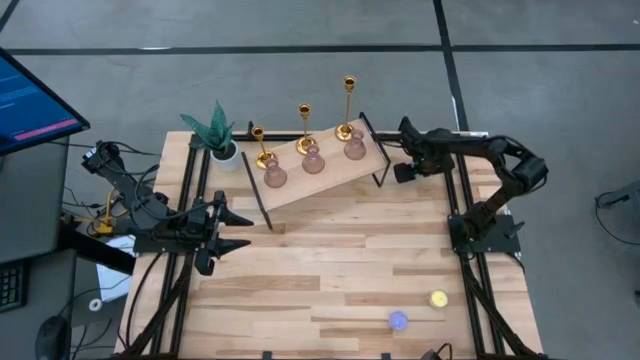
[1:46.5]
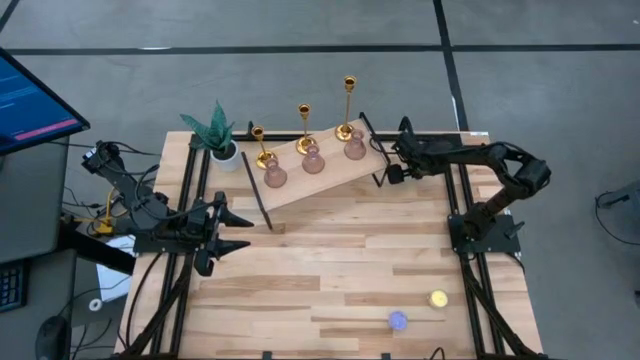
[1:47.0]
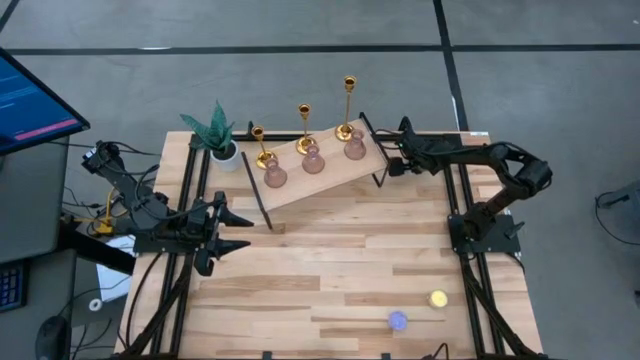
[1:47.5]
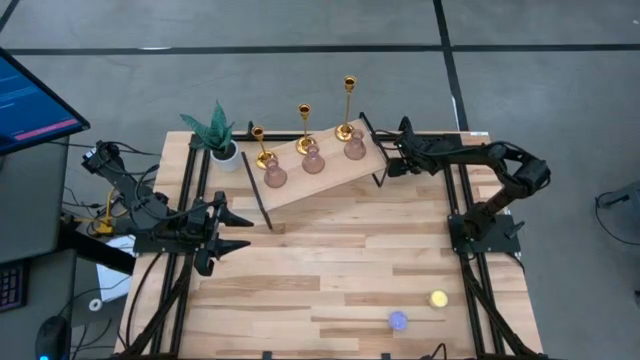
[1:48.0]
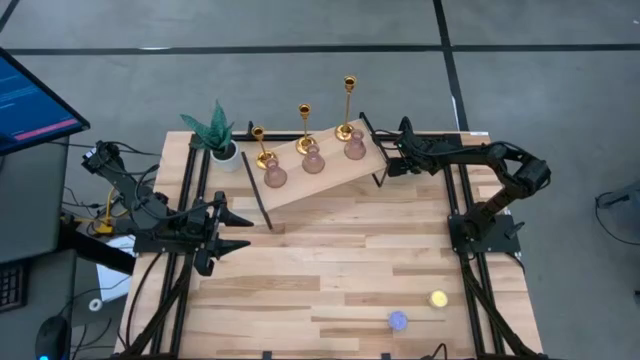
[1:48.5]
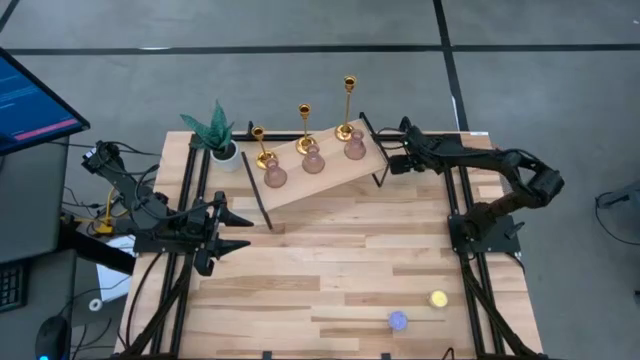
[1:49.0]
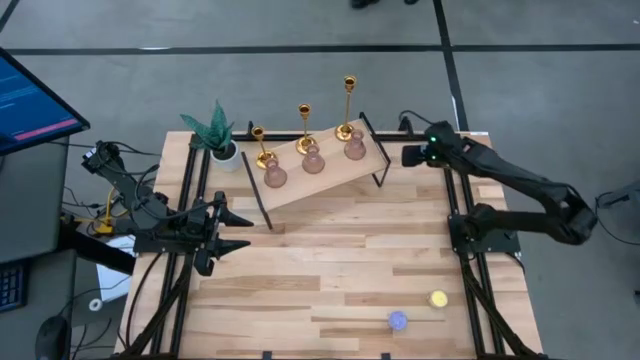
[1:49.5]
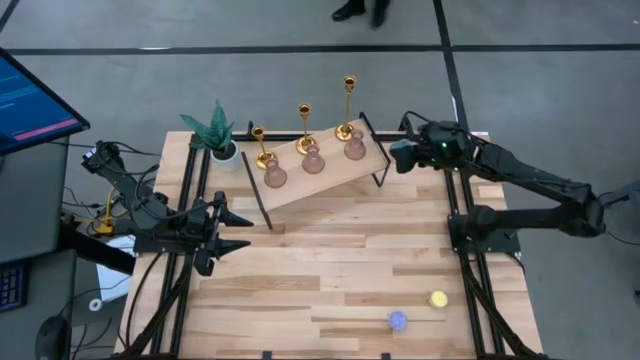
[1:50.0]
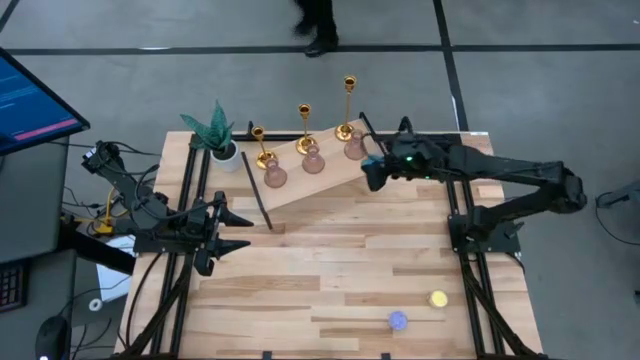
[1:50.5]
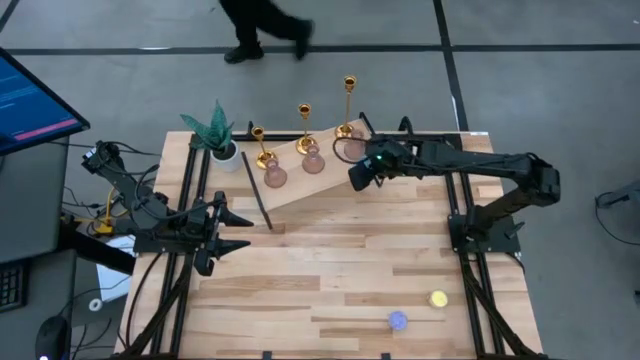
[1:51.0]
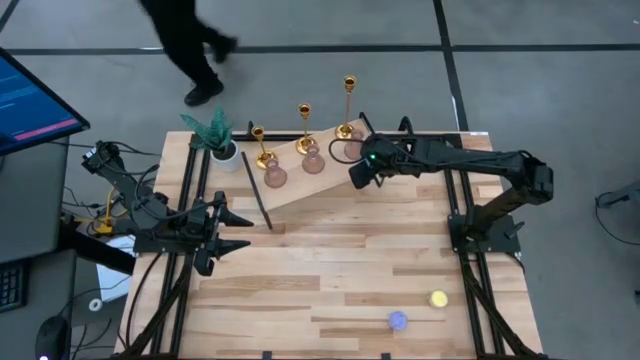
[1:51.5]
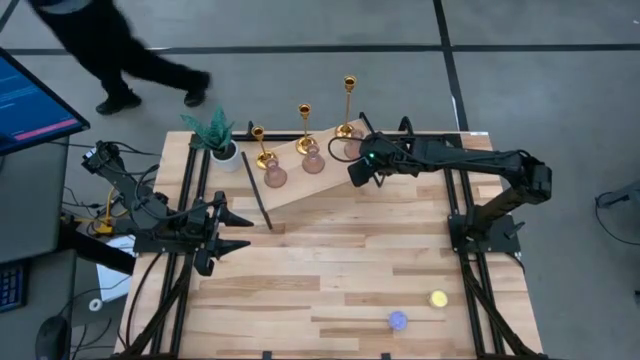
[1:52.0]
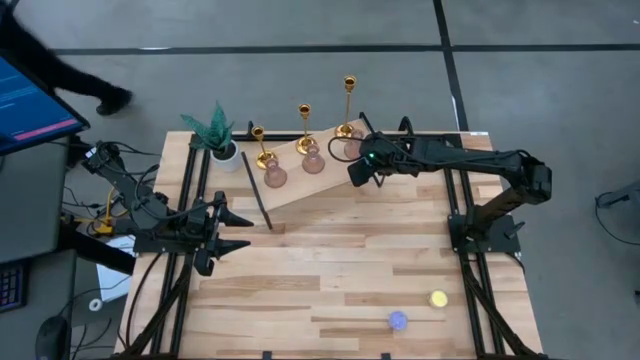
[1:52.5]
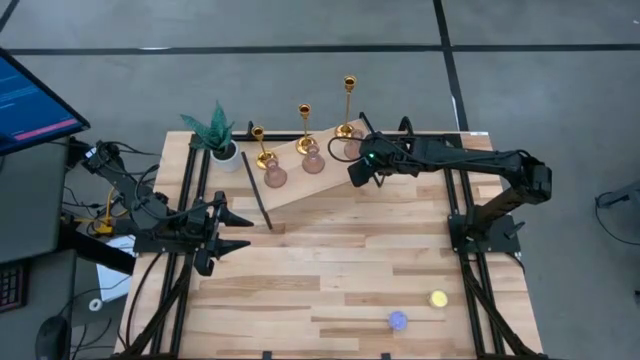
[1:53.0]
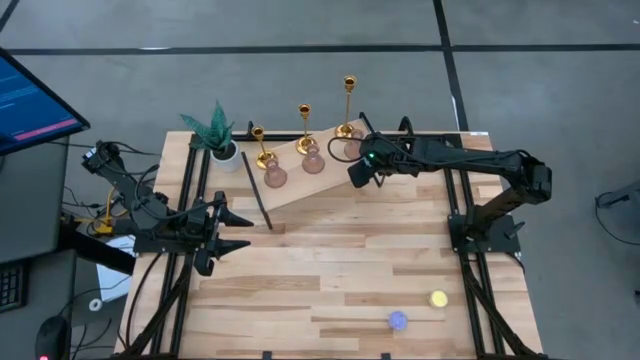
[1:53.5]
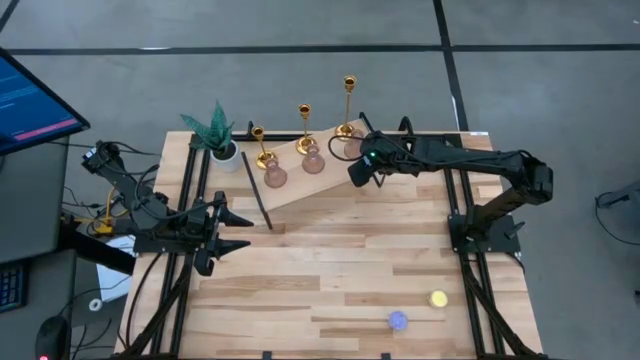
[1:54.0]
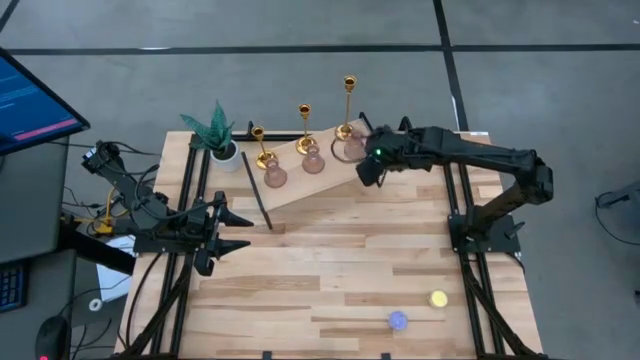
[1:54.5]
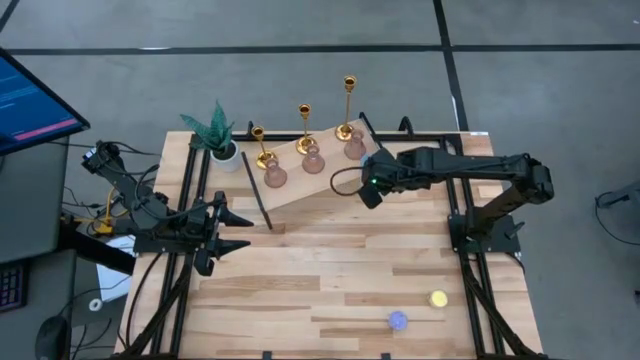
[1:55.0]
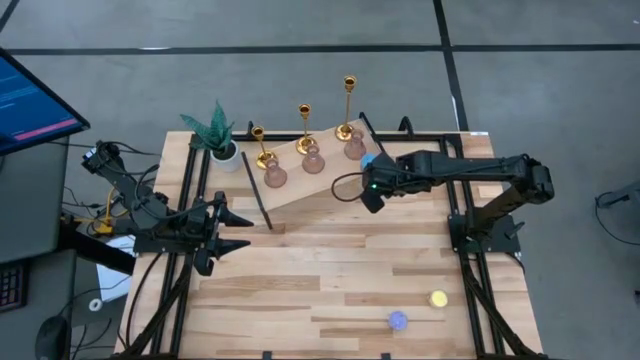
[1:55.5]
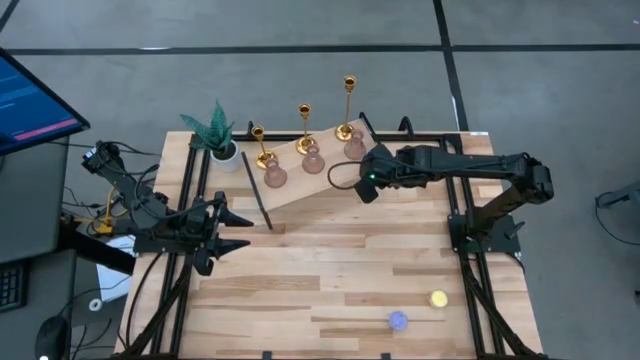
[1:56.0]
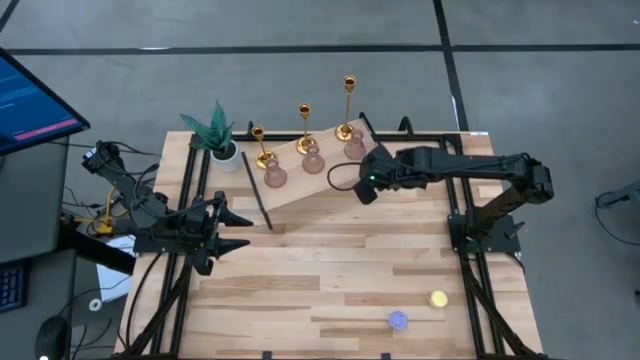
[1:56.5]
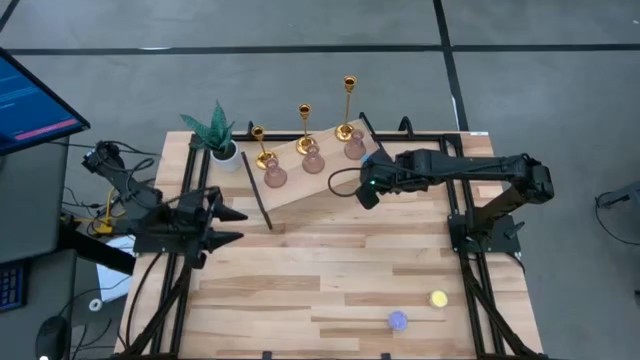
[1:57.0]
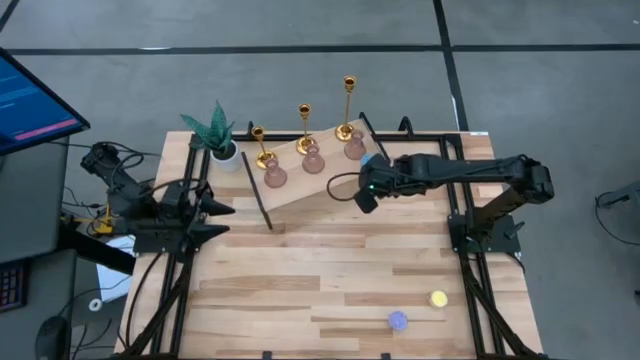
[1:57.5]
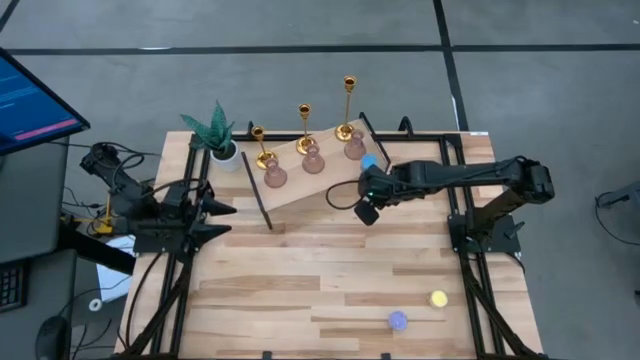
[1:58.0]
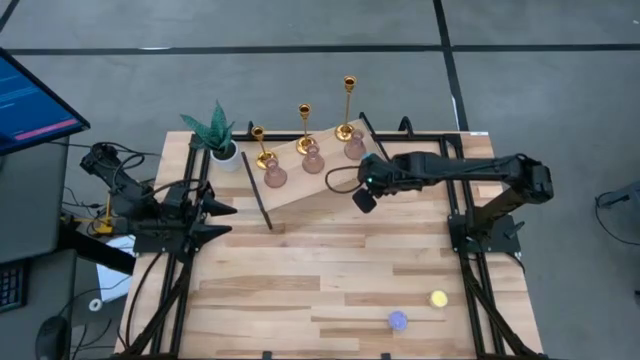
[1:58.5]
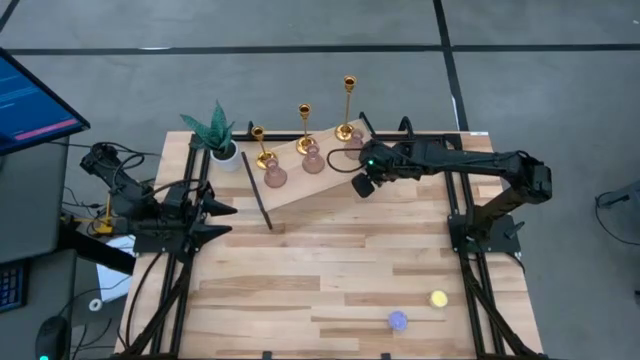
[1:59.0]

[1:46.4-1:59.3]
Task: Pick & Place candle stick holders
Put the blue scented candle on the shelf

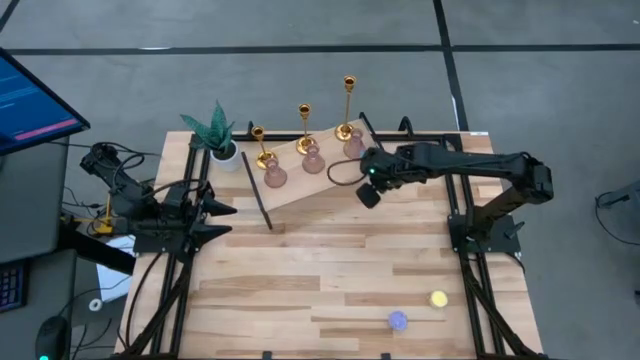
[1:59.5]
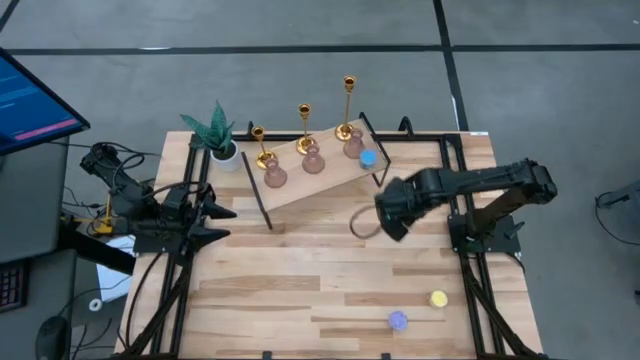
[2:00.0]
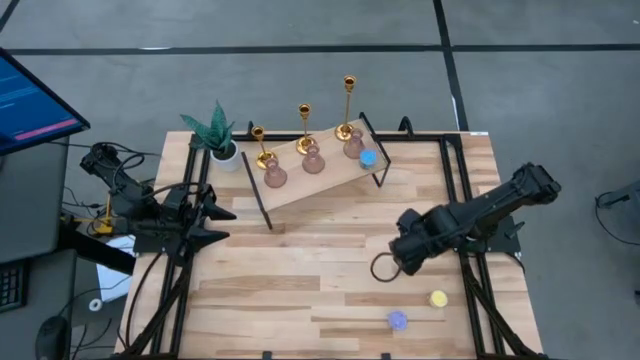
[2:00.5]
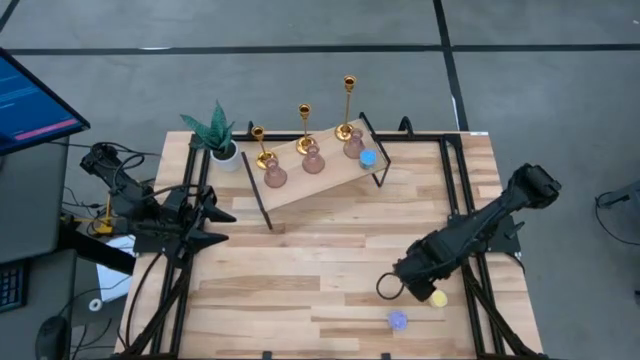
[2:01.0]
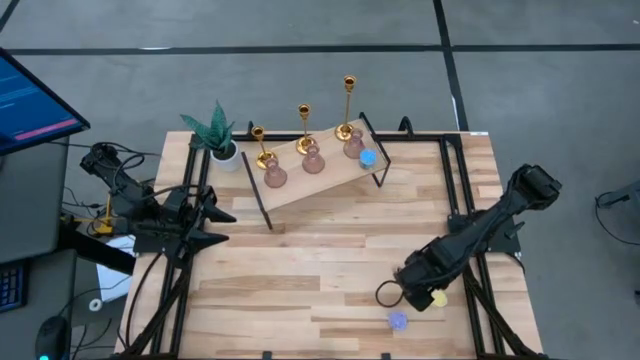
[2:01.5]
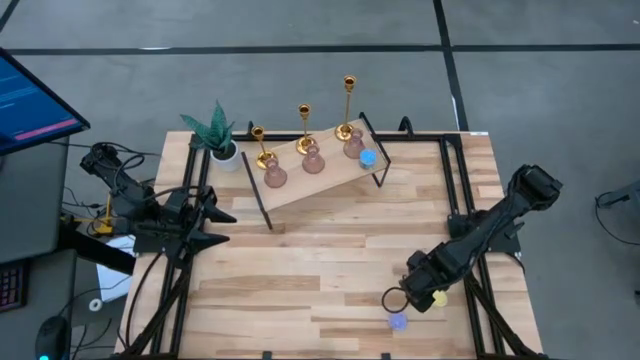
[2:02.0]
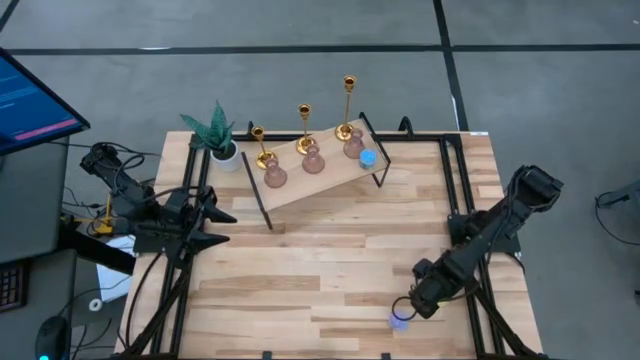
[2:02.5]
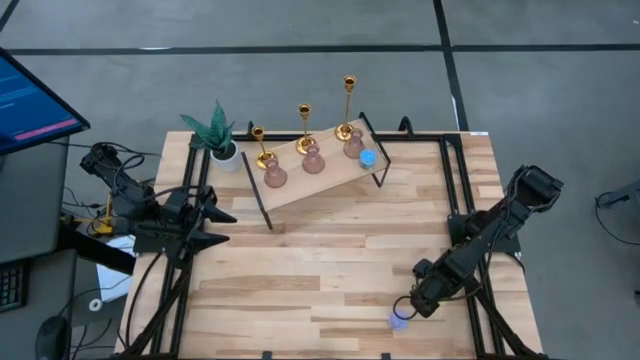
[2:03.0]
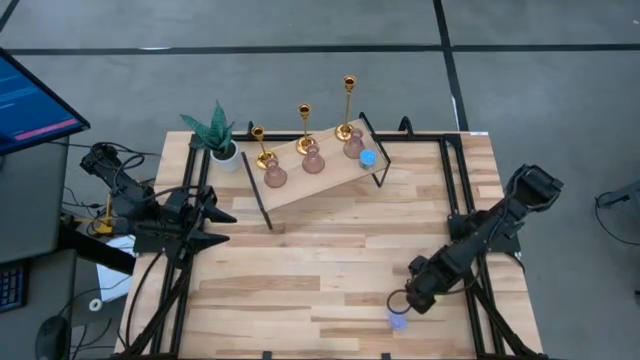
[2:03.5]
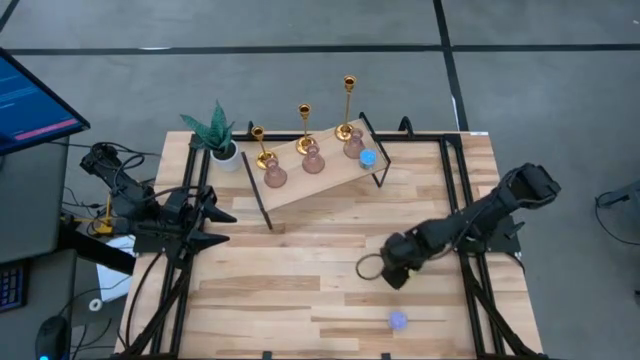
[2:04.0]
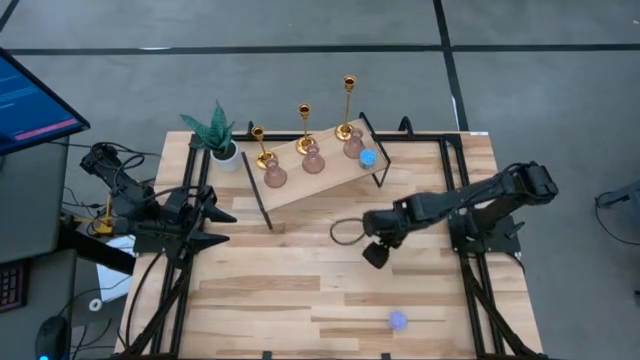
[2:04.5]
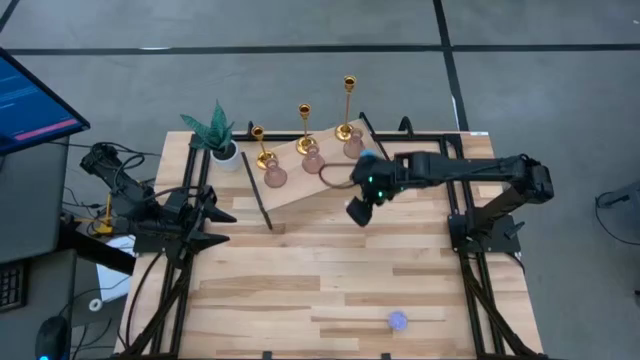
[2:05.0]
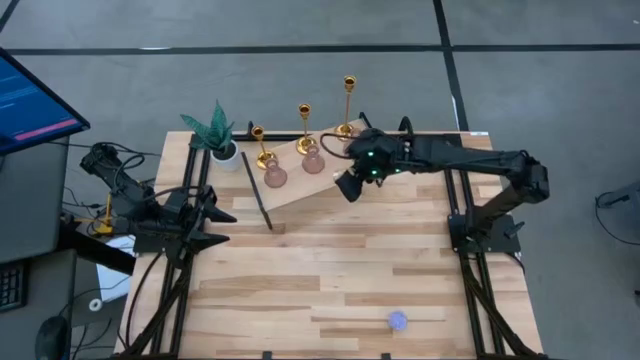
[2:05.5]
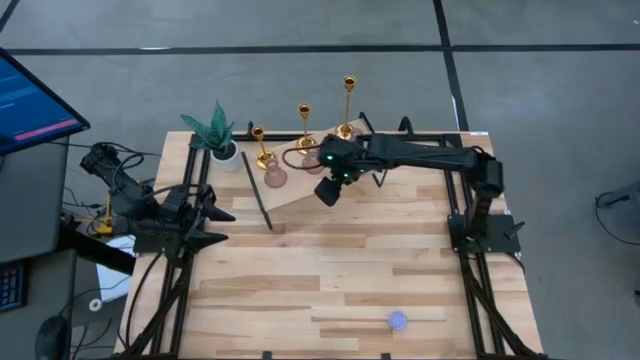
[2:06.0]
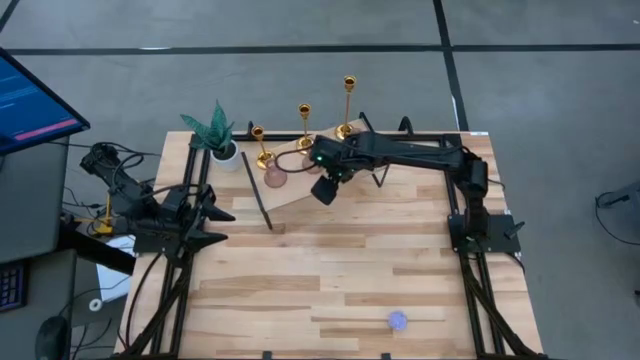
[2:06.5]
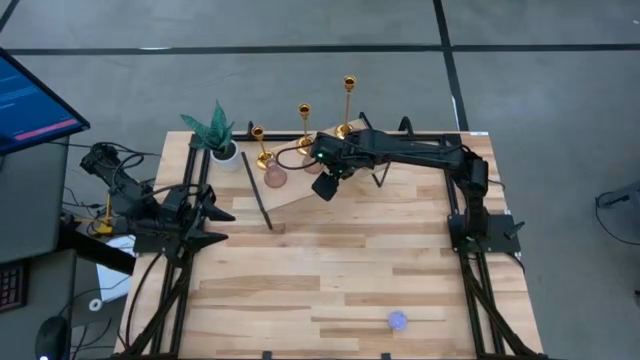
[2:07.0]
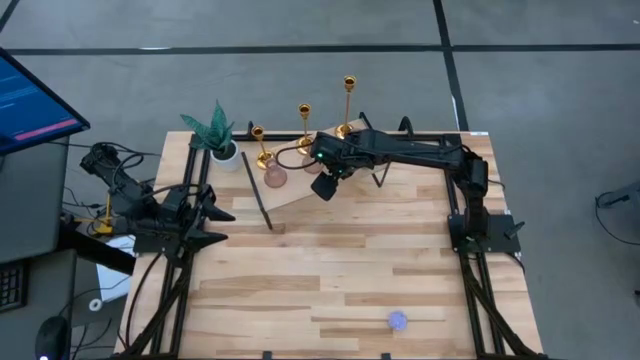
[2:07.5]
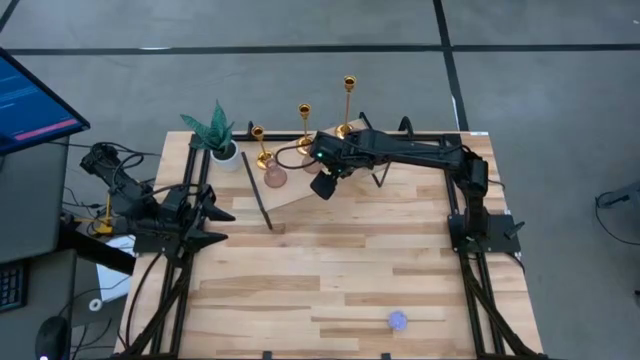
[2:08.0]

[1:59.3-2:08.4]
Put the yellow scented candle on the shelf
